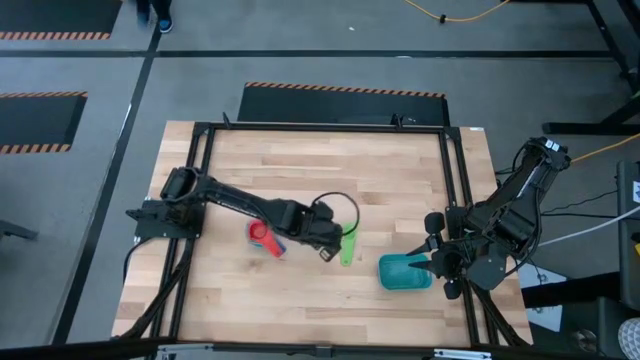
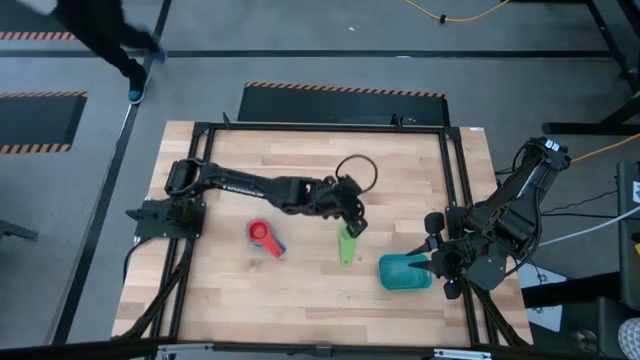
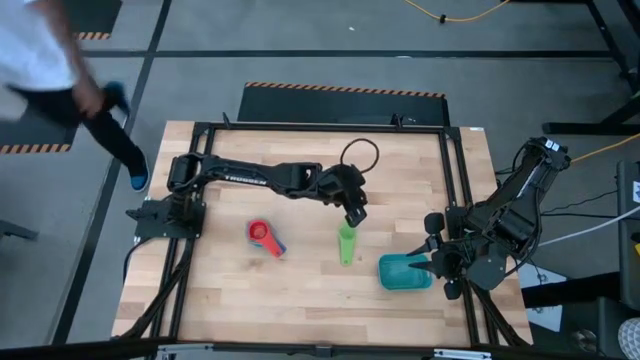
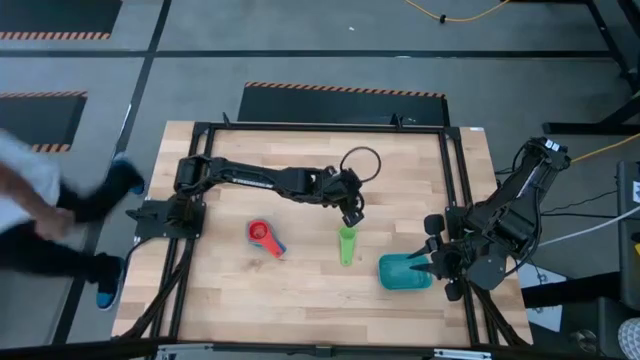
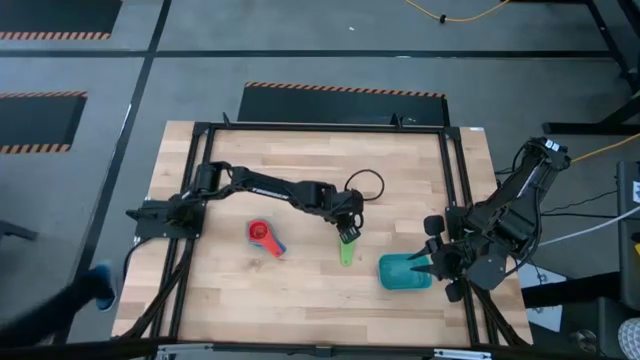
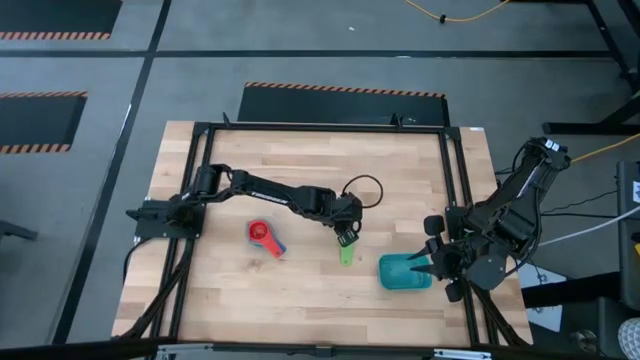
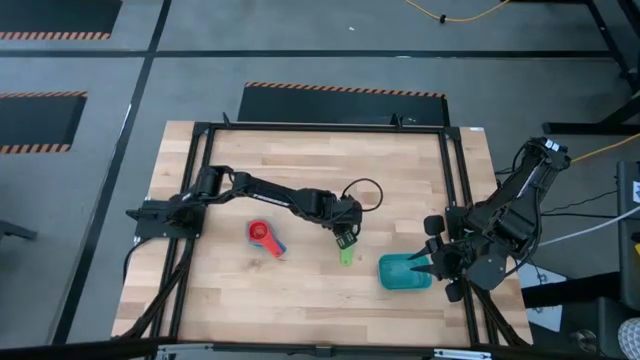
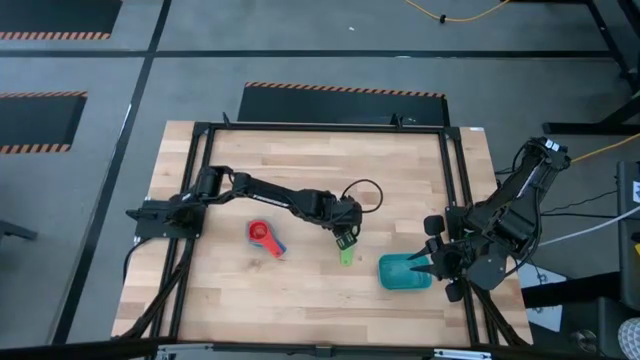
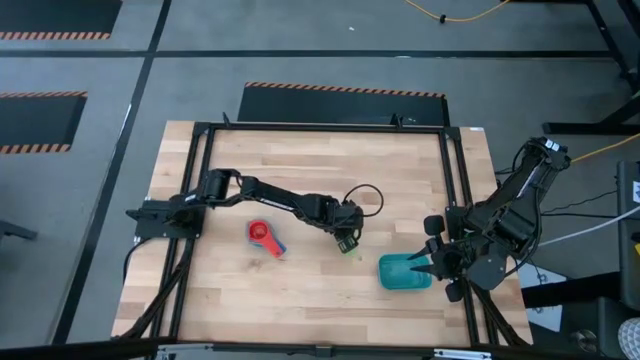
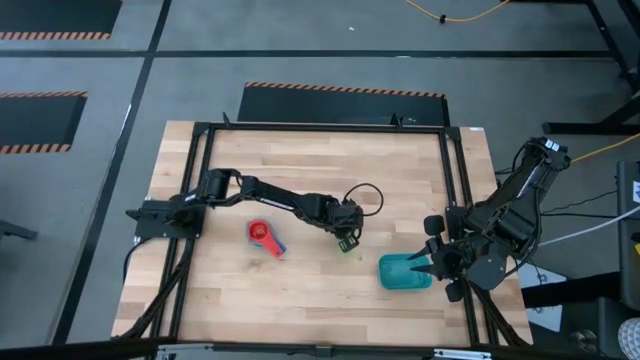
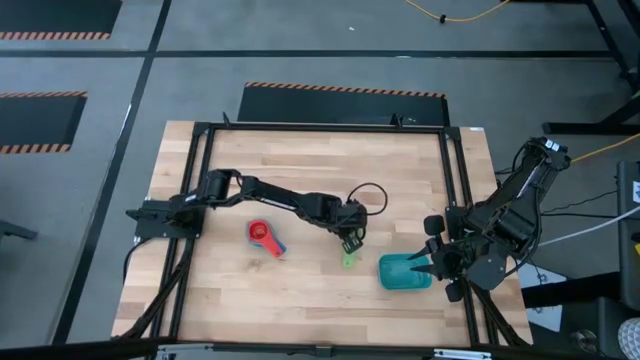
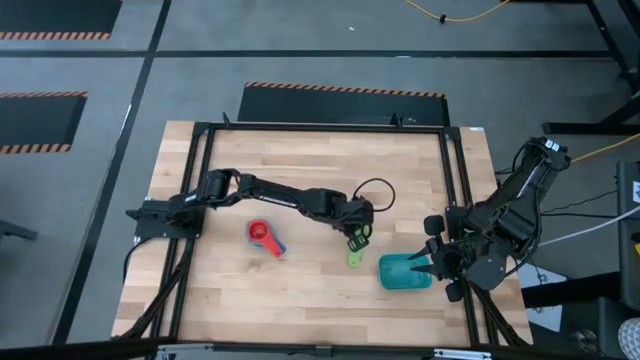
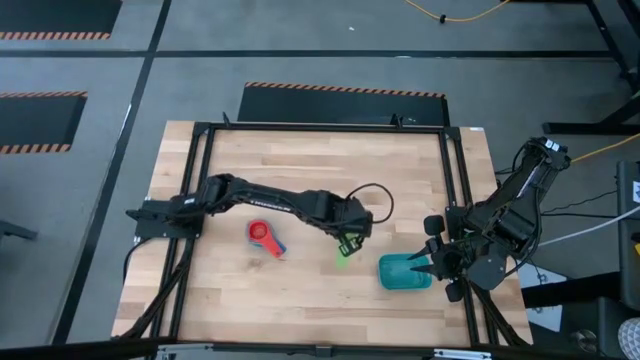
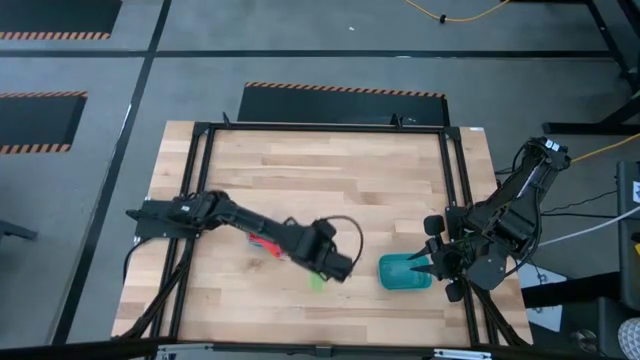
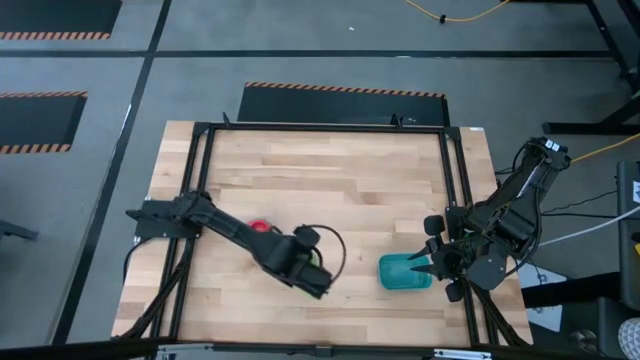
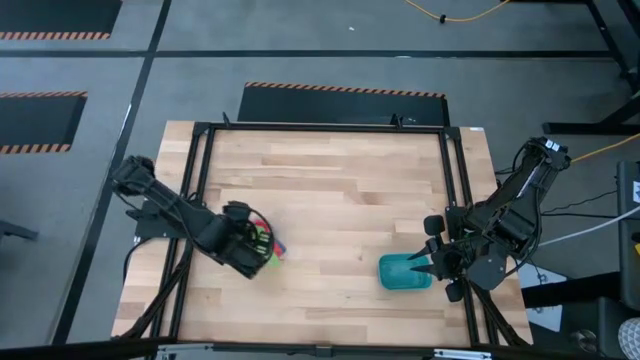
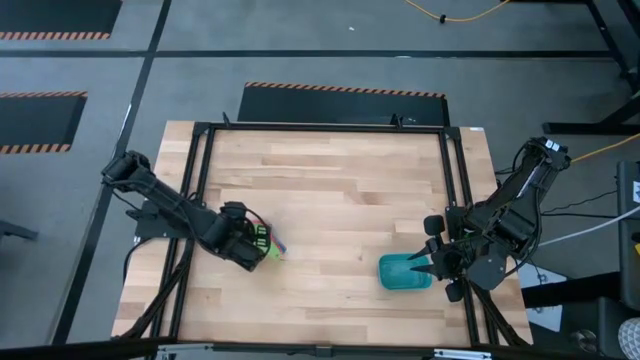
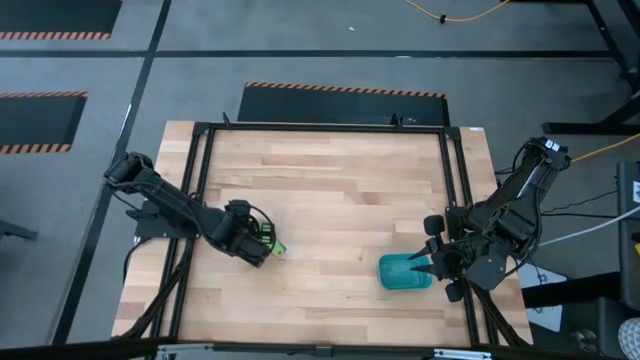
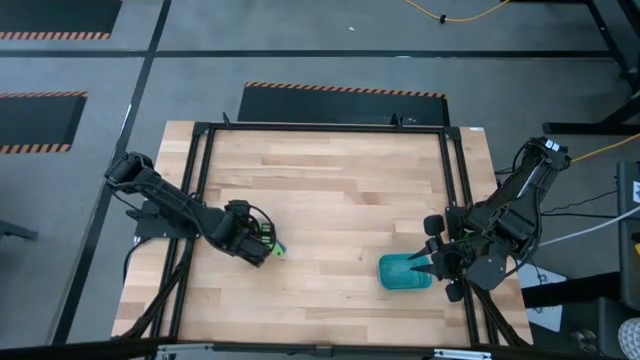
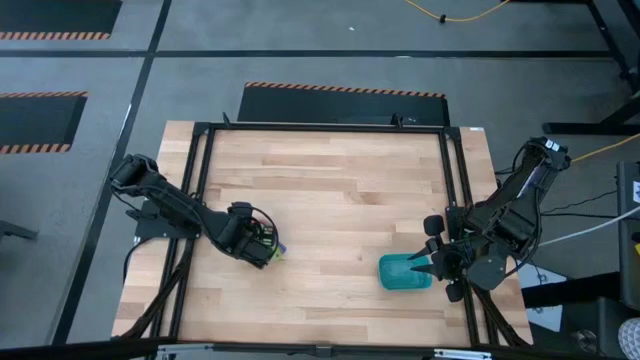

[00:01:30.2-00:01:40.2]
Task: Nest measuring cups in basket
Stack the green measuring nest cup into the red measuring nest cup

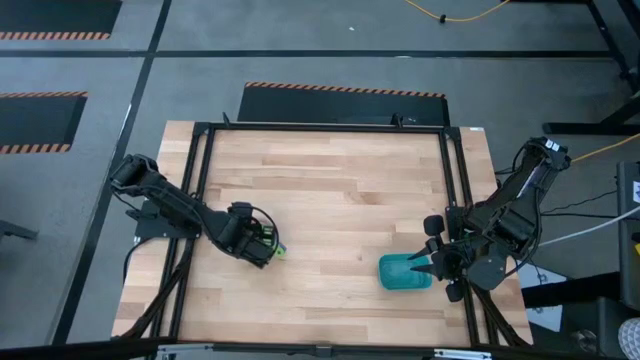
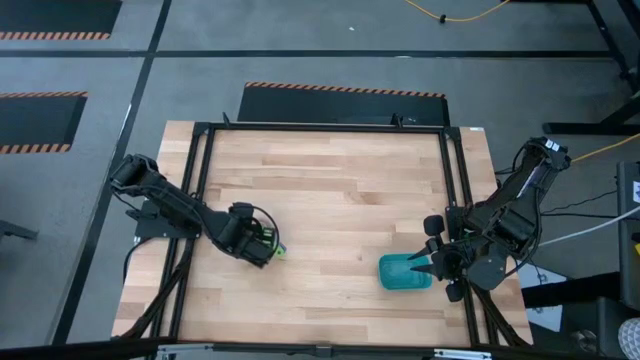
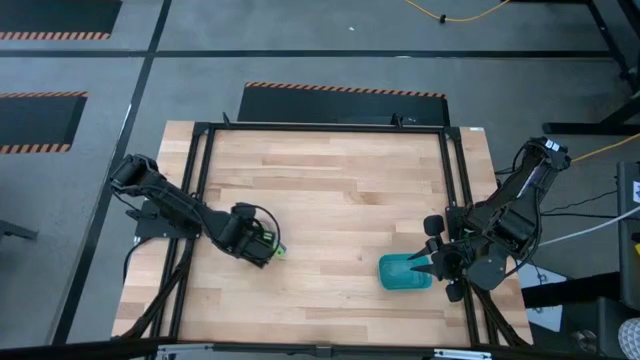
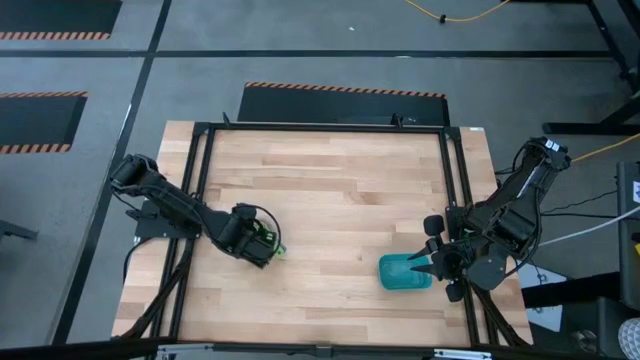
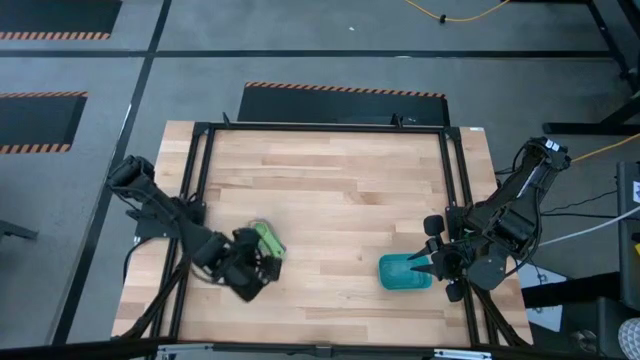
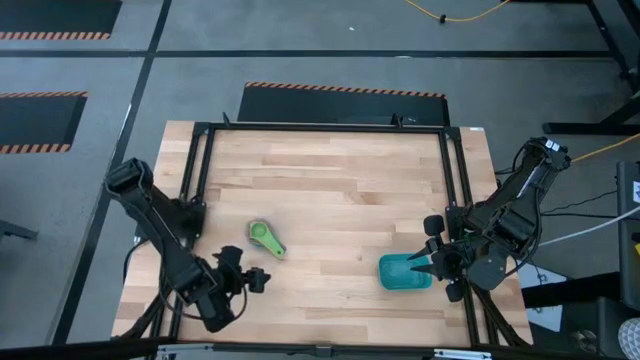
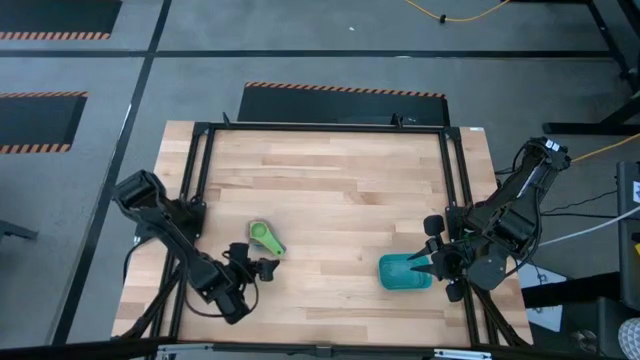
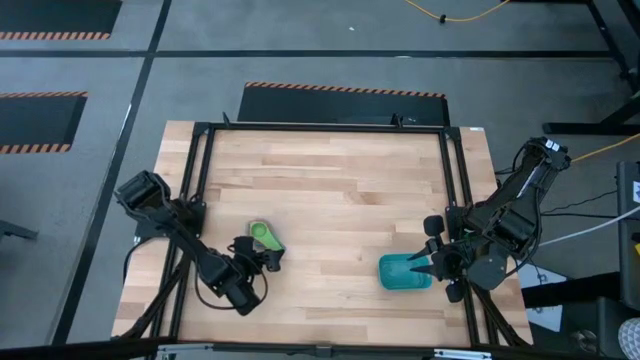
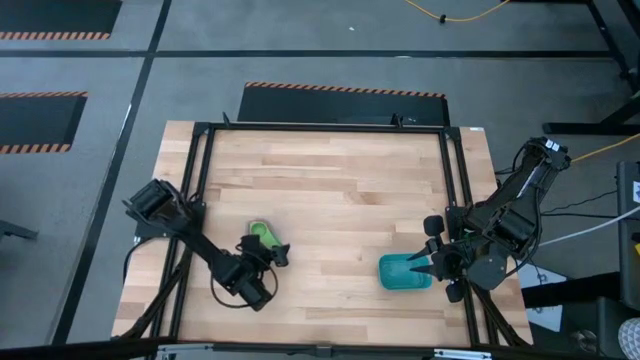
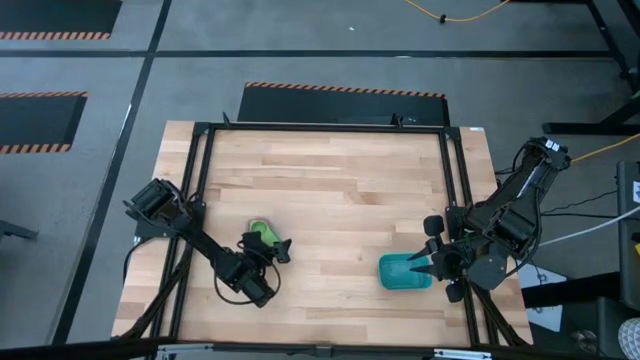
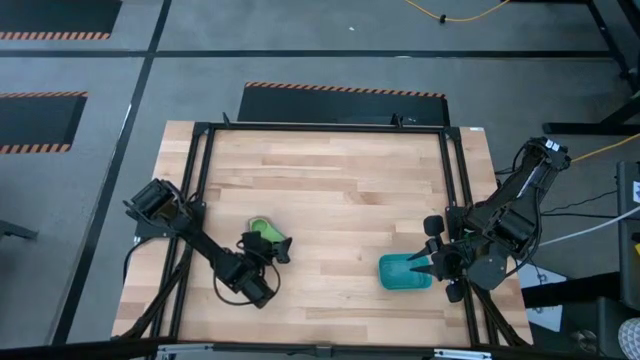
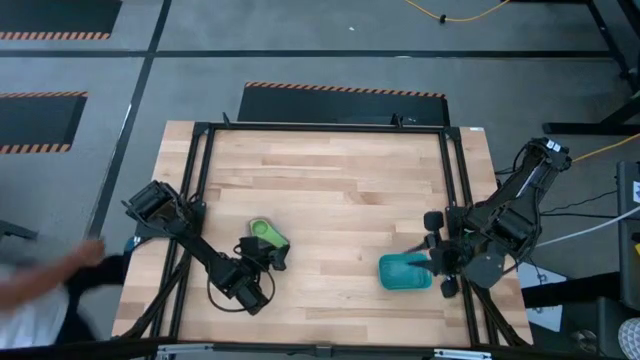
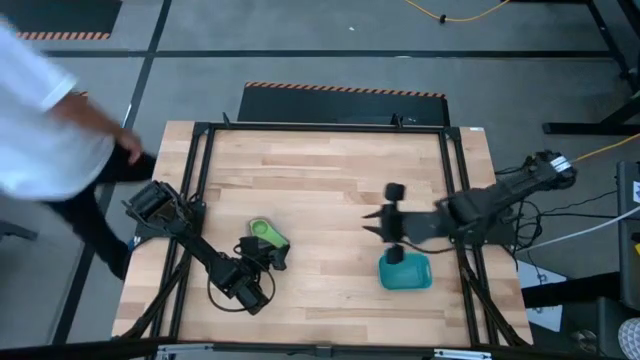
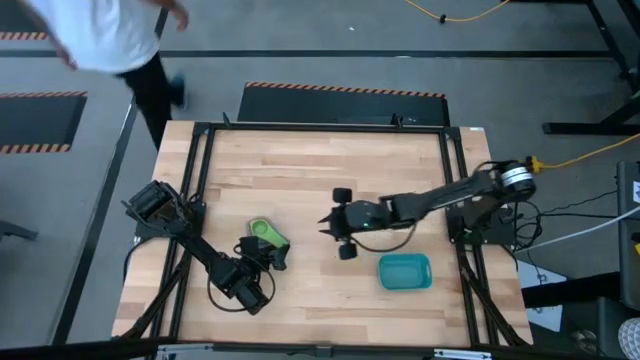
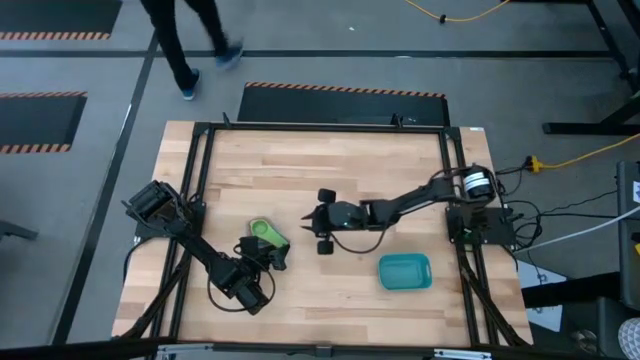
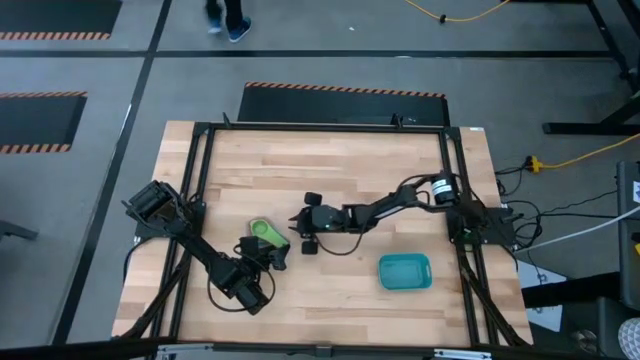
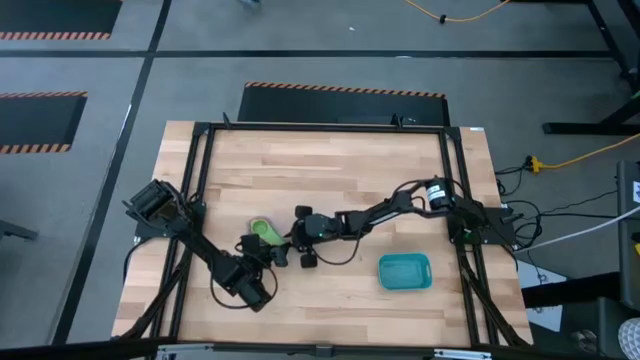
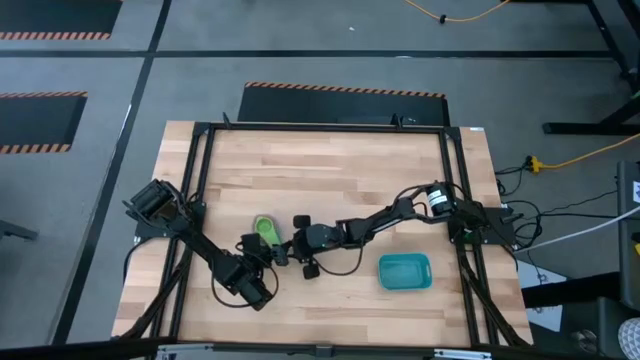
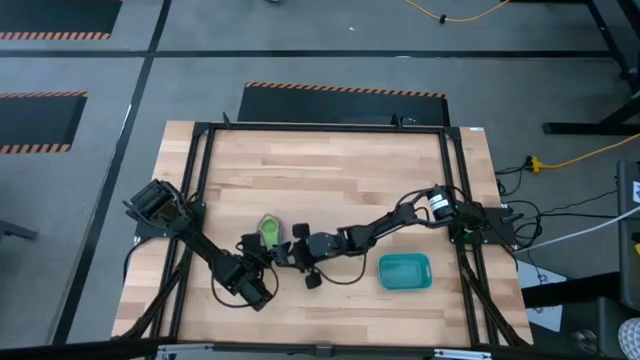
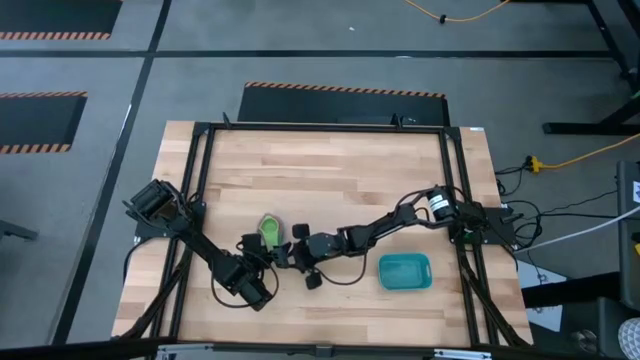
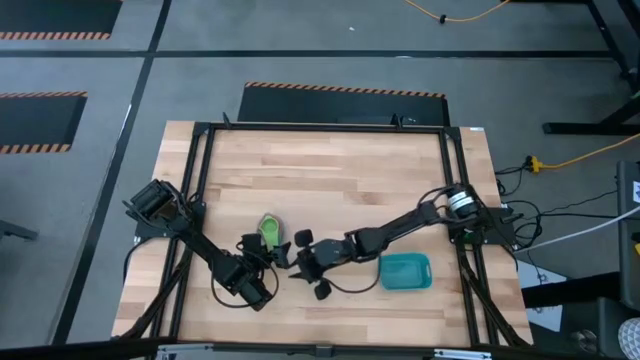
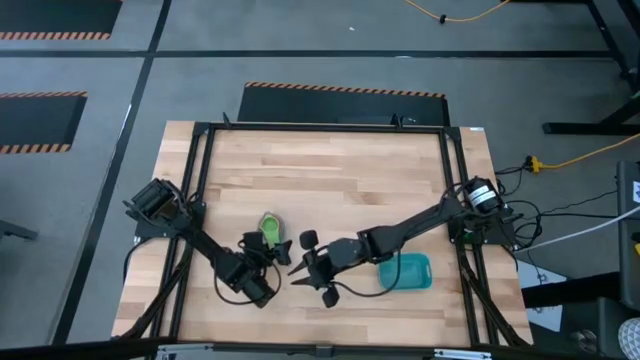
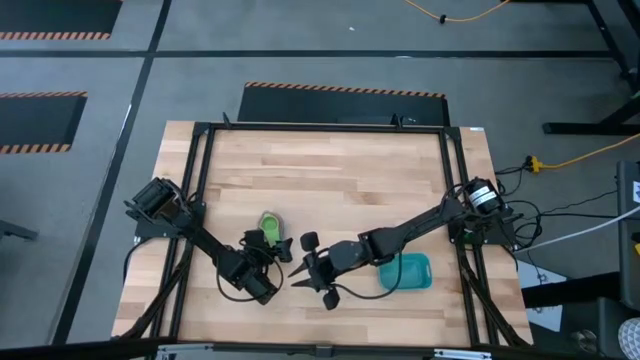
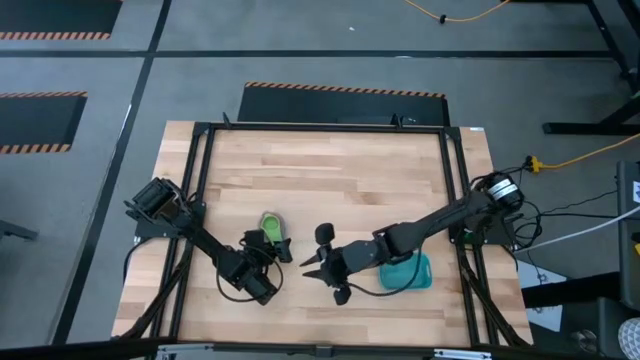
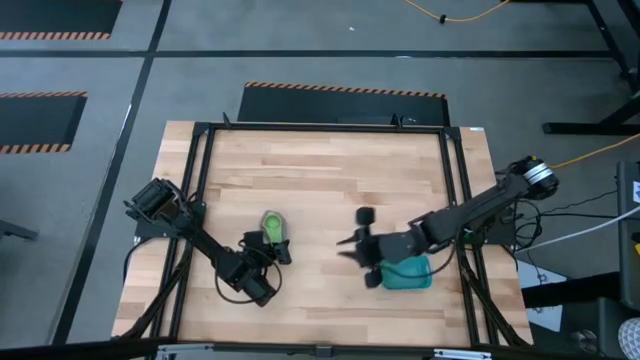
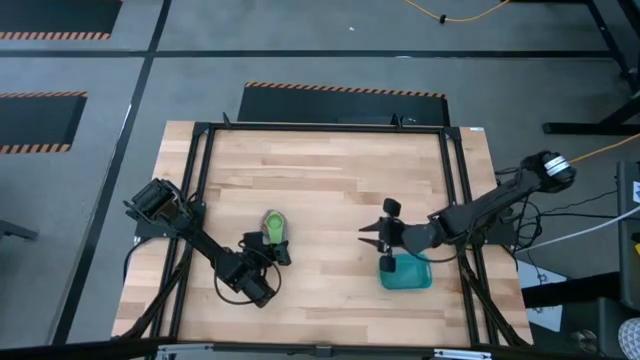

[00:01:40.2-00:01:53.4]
Put the stacked nesting measuring cups into the blue bin
